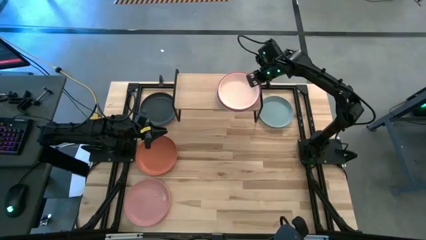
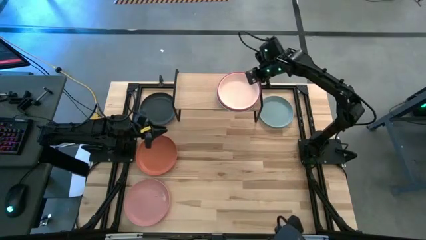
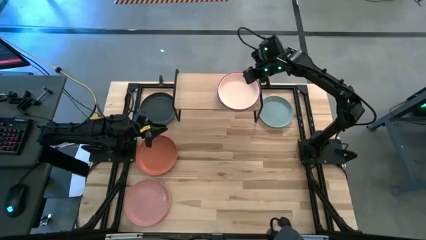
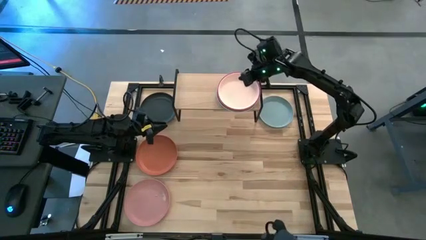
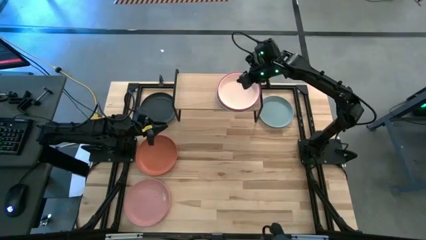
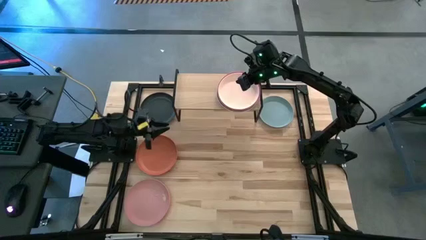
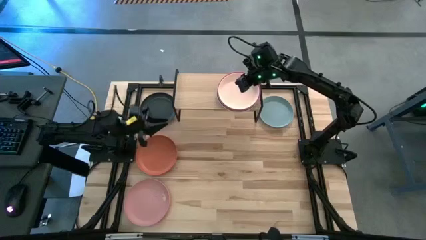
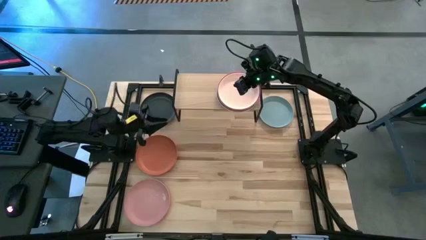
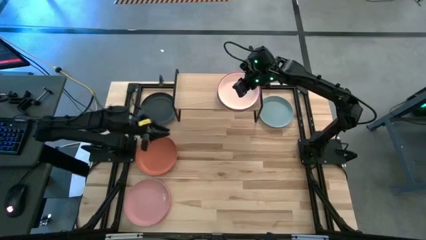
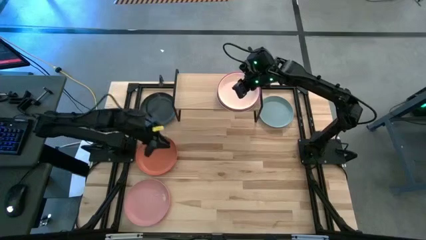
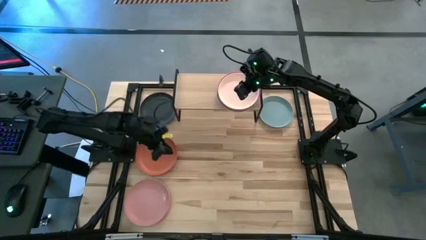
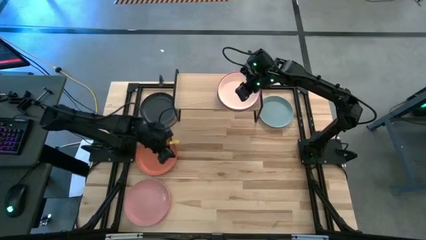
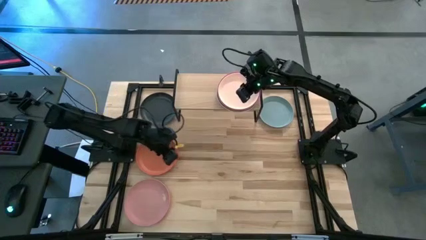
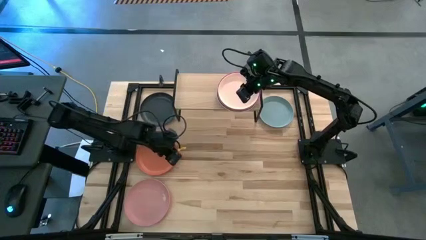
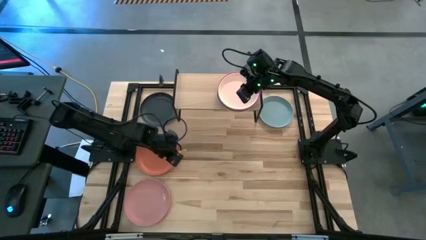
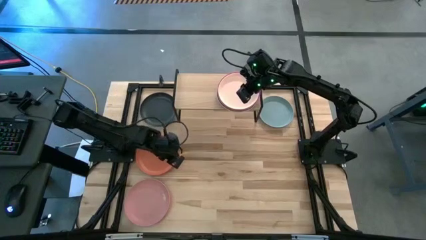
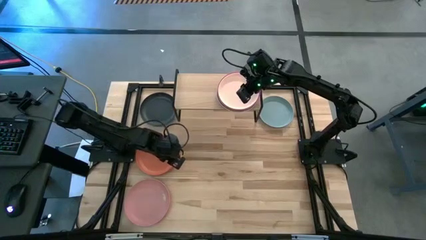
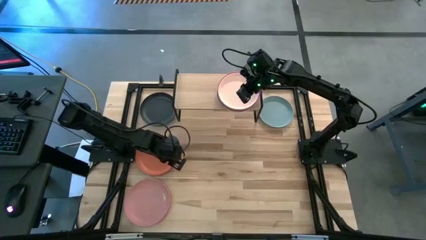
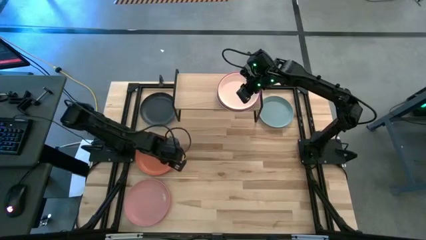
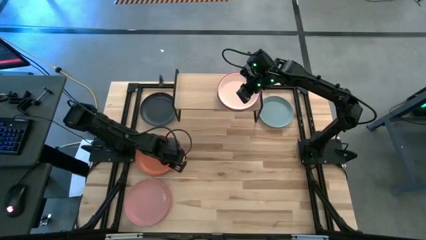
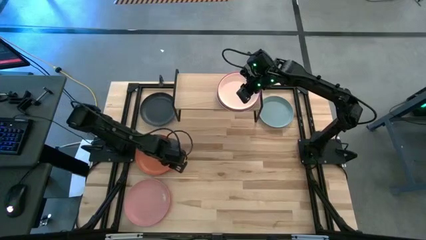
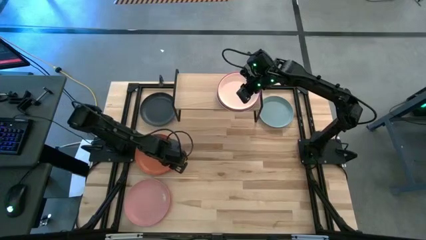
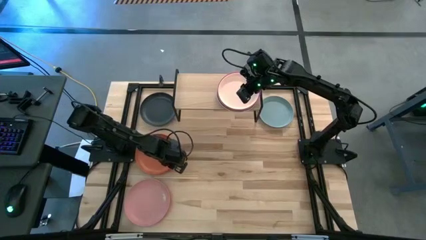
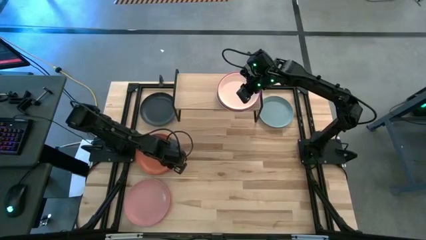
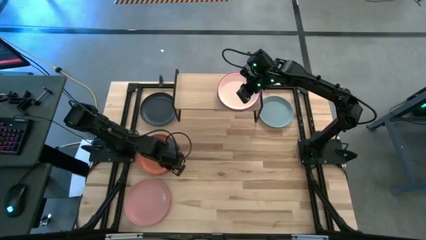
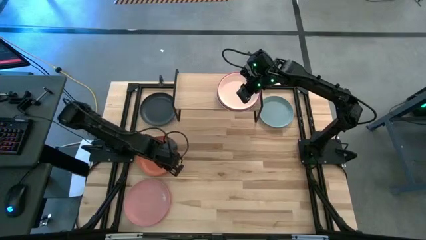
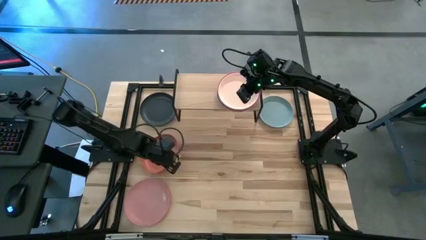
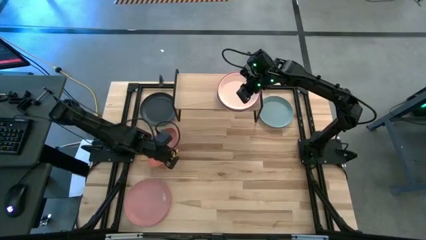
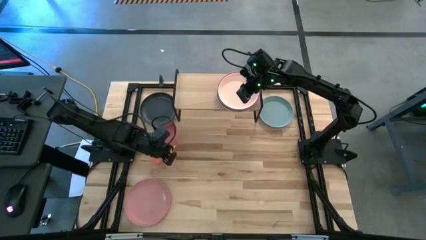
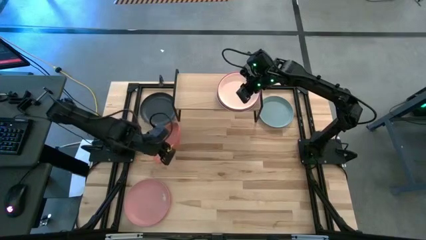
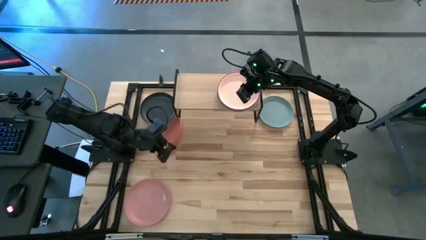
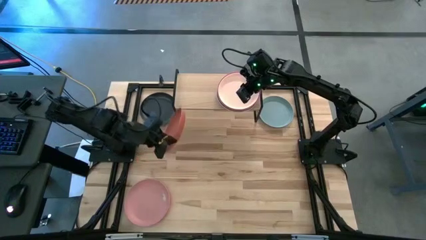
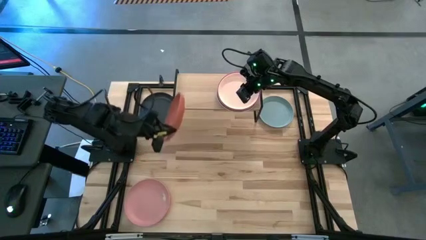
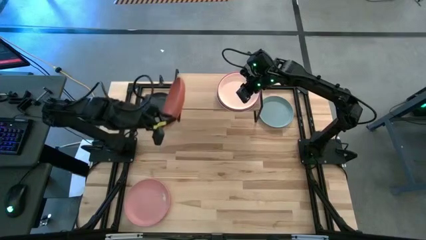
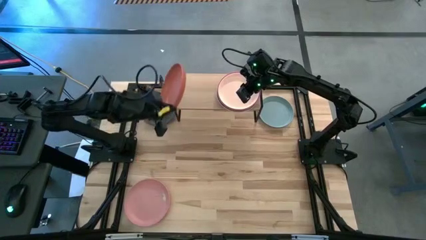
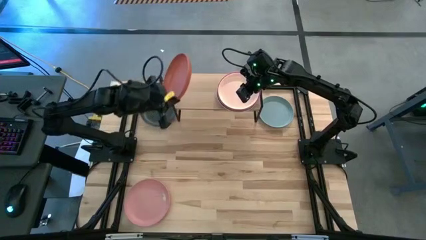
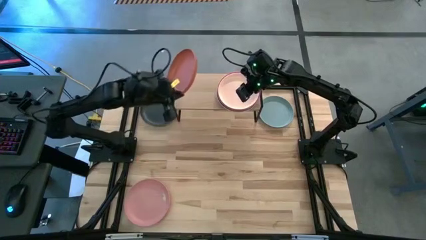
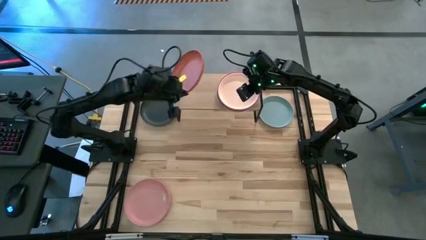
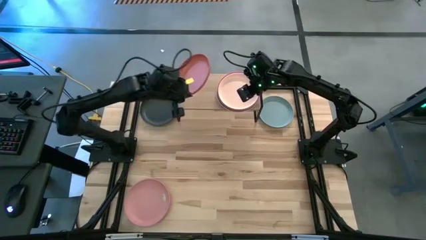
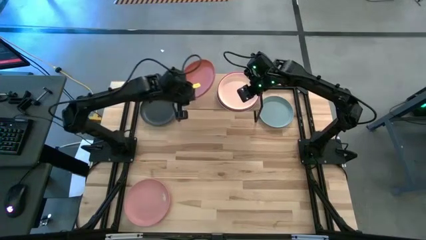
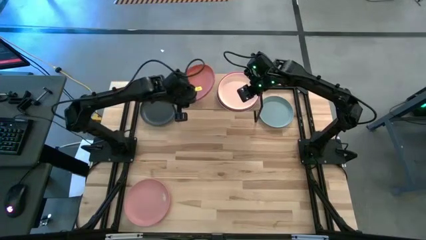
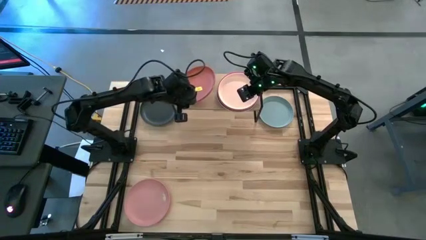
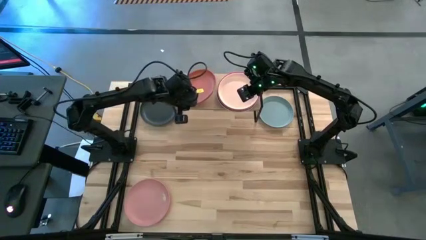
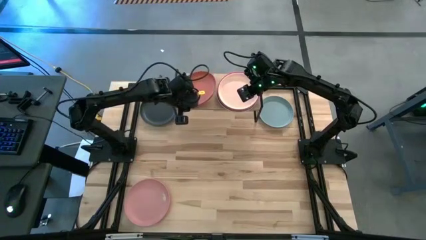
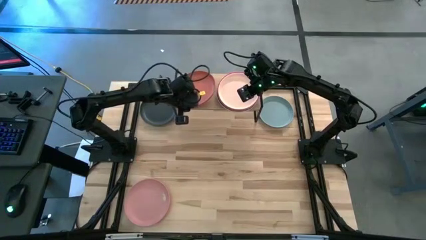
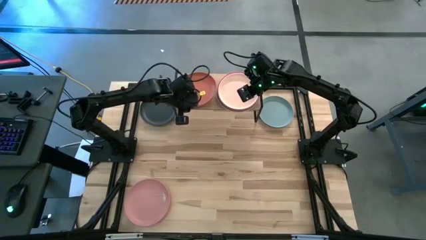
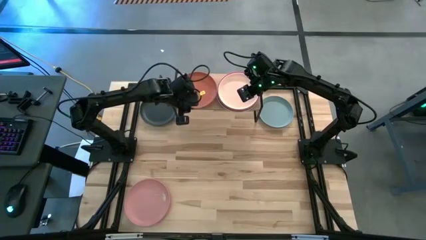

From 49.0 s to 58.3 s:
Task: Place and stack plates onto a shelf
Put the orange plate on the shelf

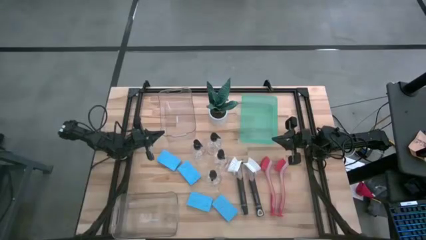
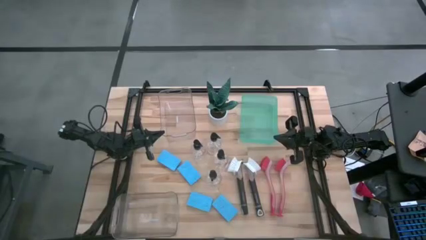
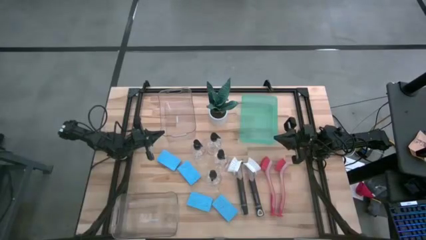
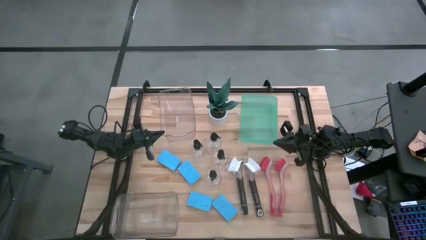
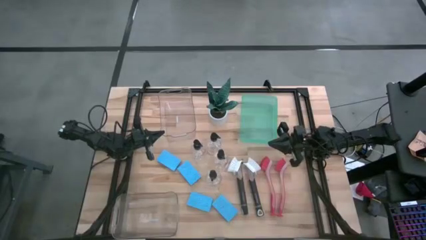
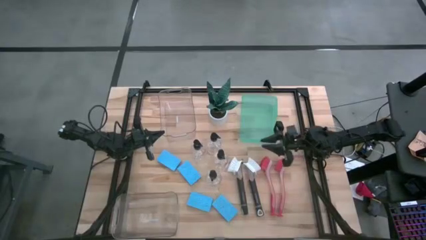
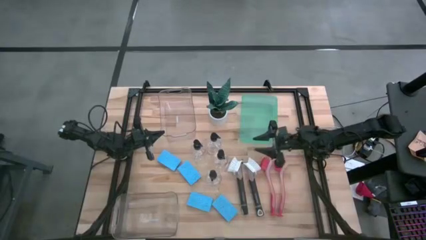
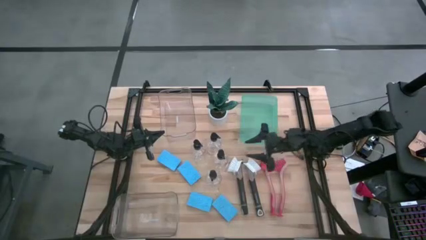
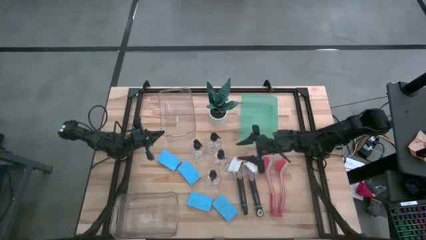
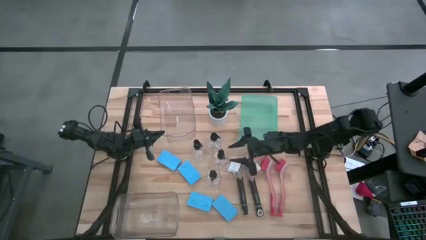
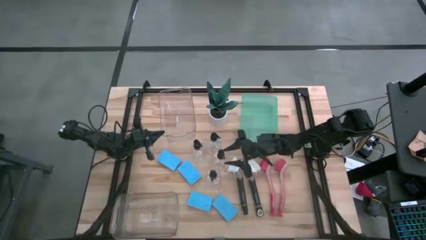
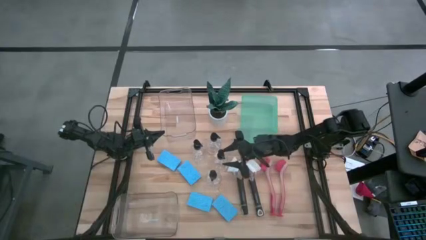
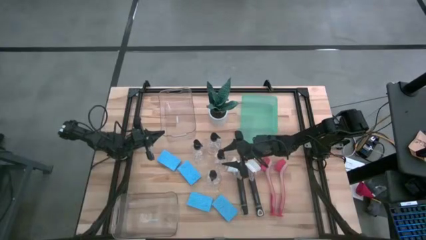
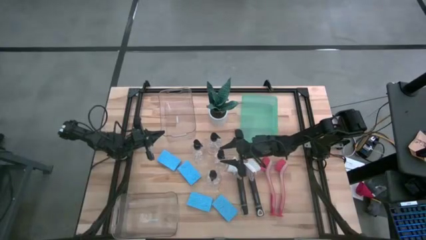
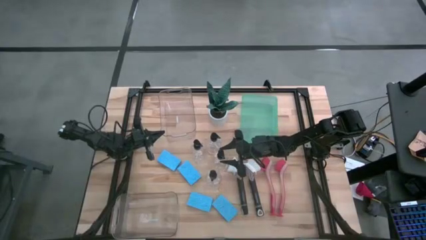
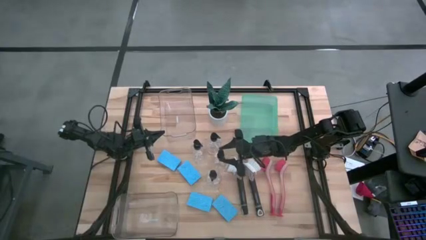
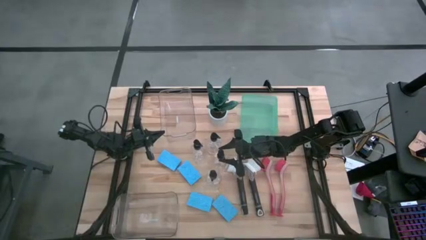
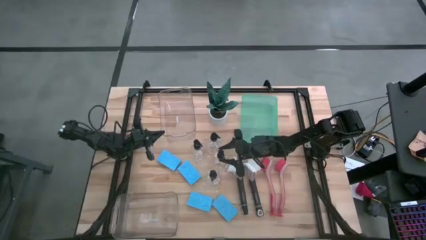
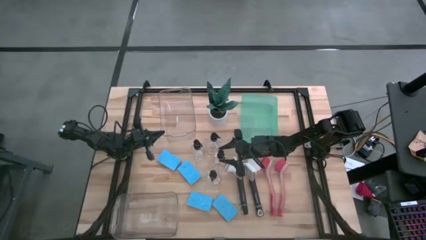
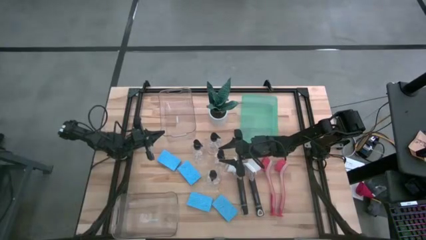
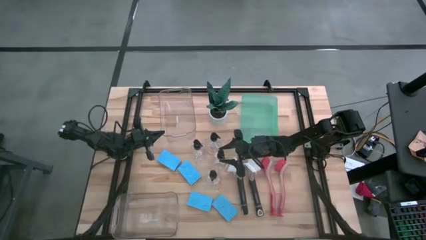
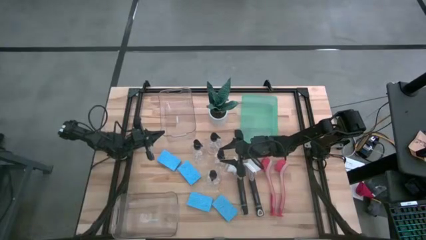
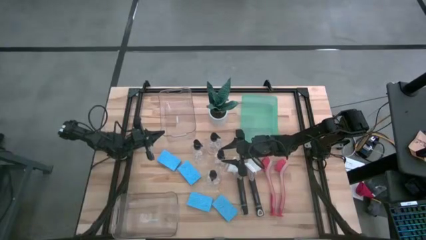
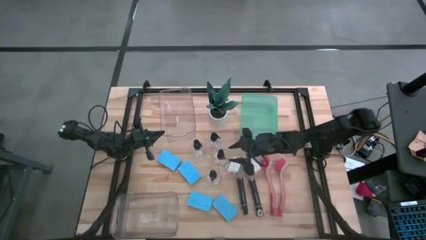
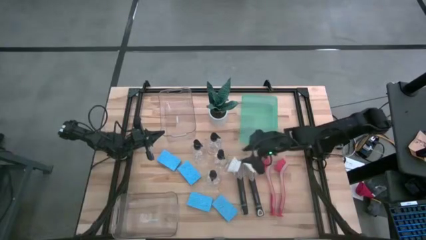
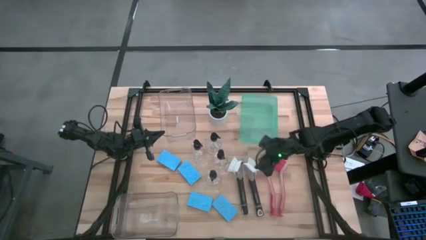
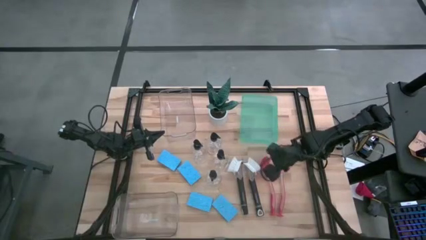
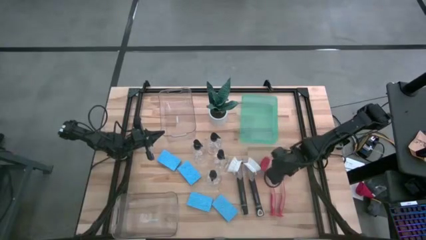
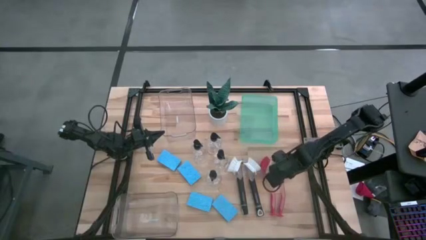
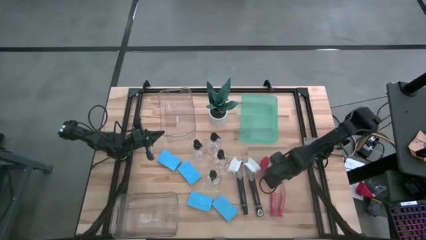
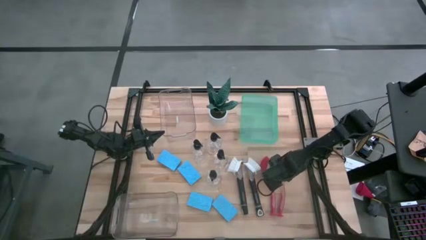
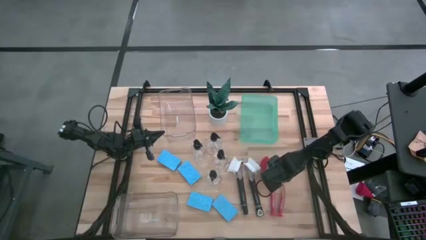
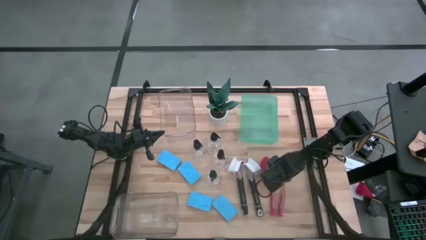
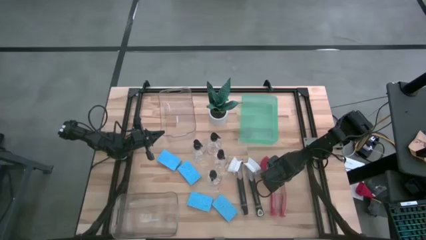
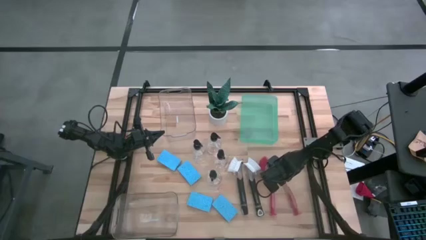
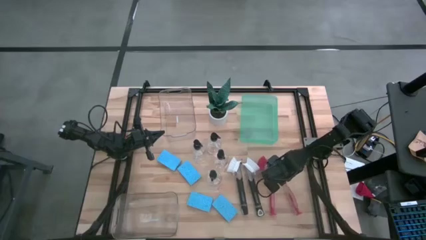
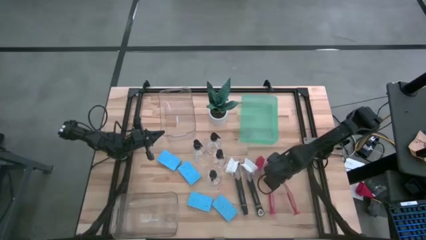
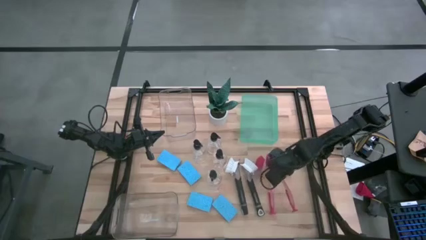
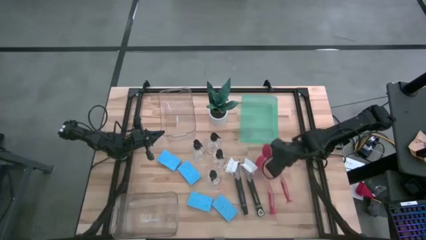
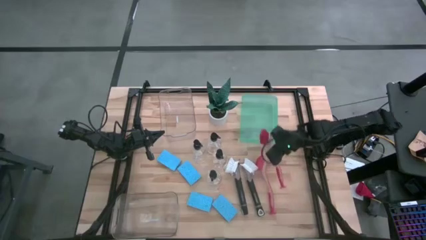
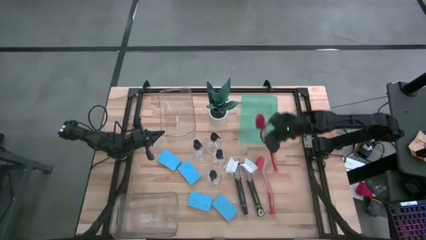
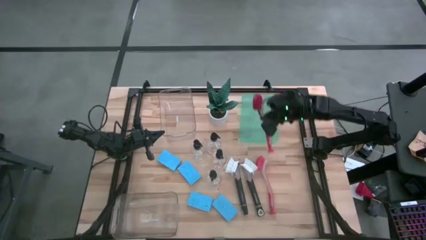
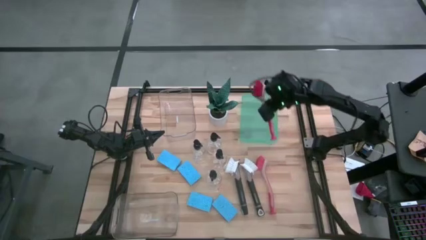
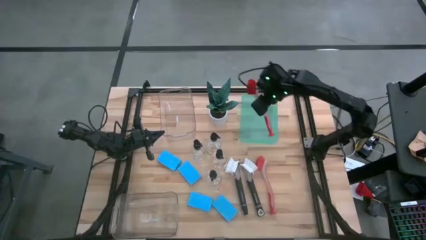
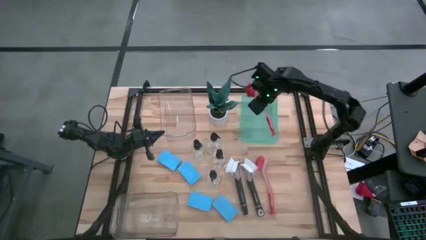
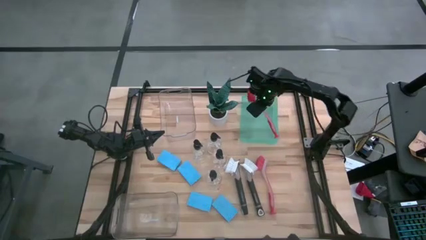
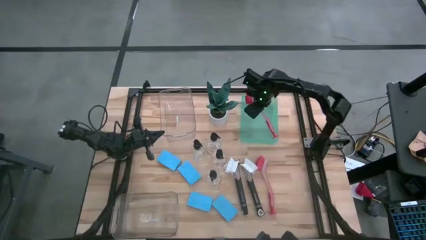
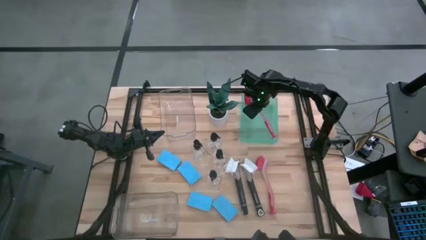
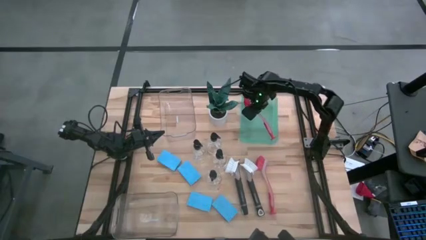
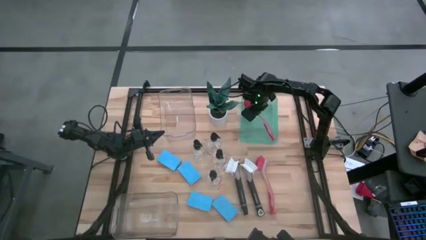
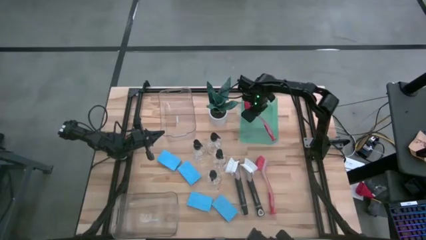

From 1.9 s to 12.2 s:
Task: Pick & Place Kitchen Sink Supplies
Put the red dish brush into the green bin
